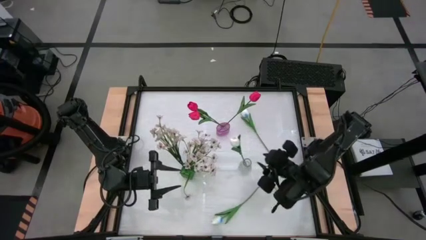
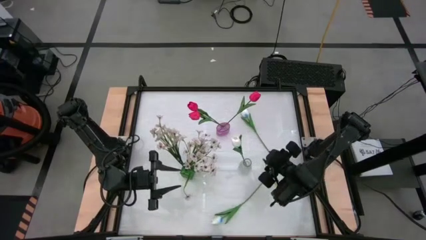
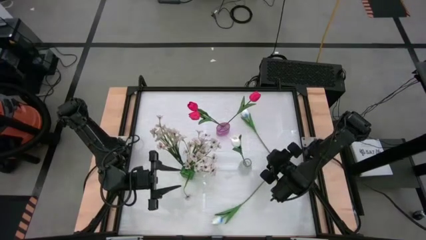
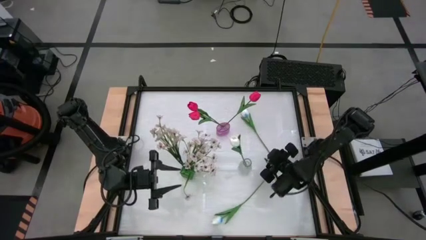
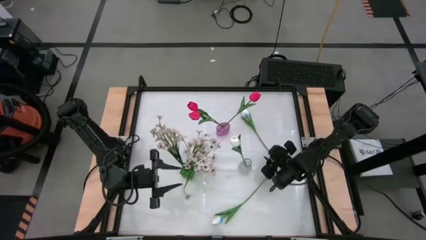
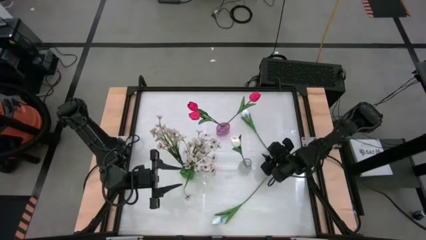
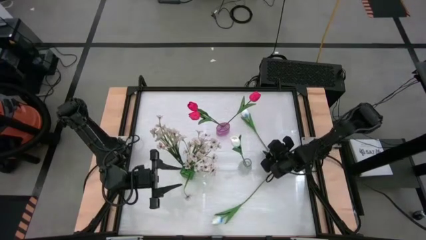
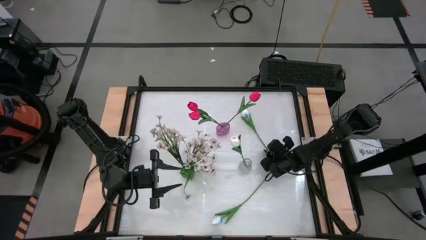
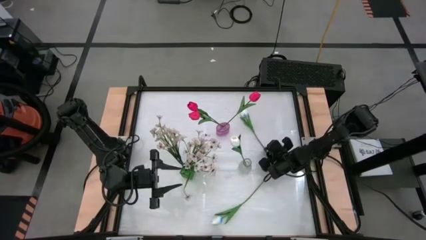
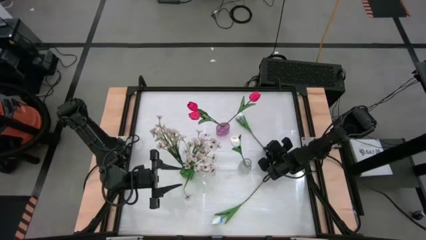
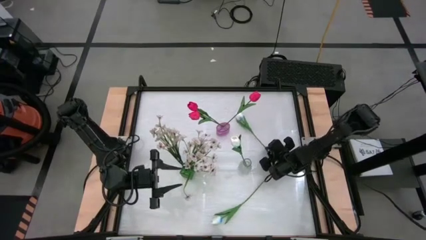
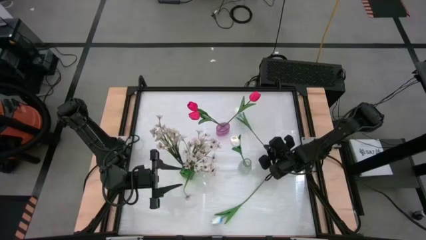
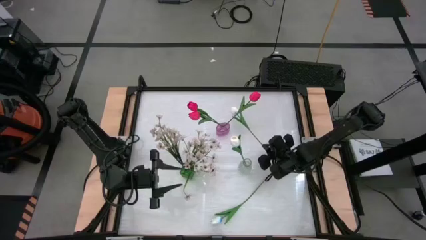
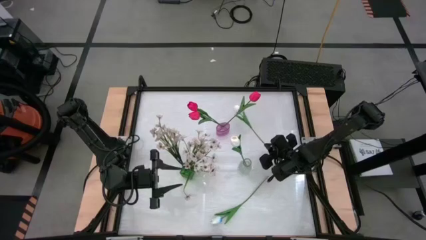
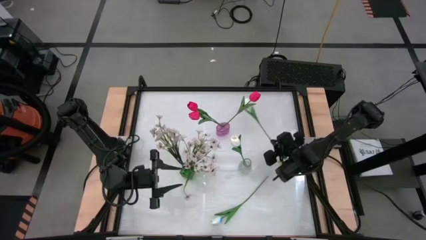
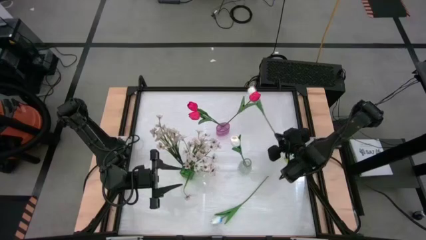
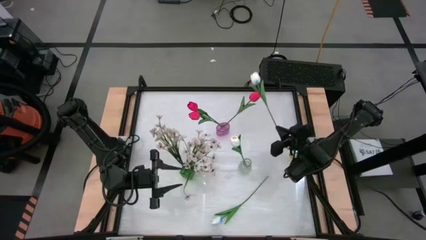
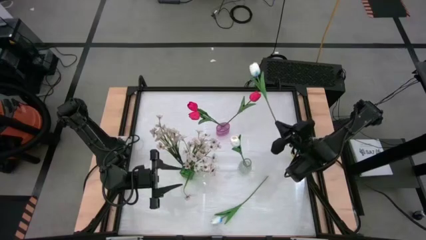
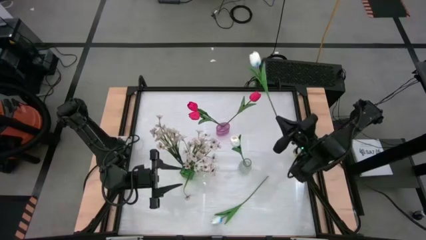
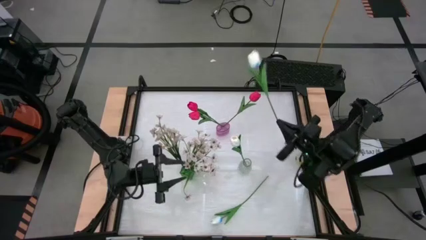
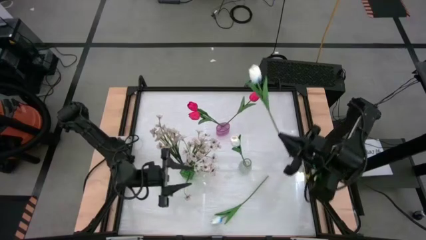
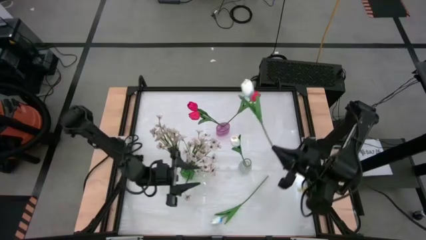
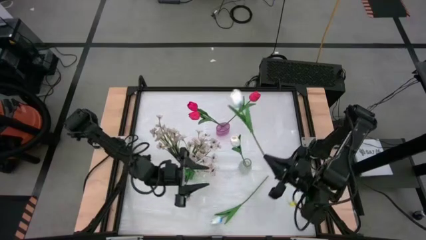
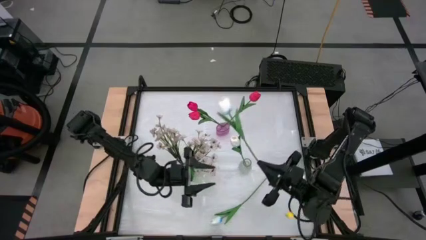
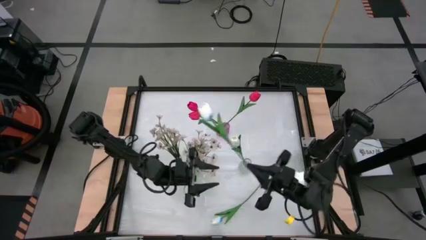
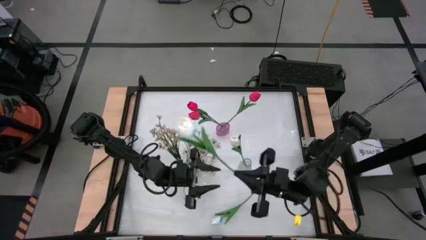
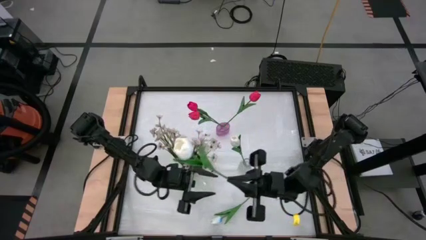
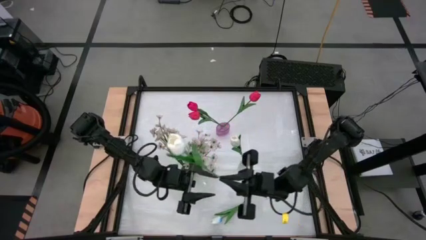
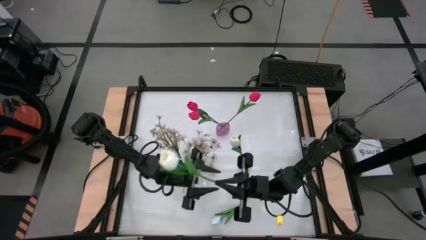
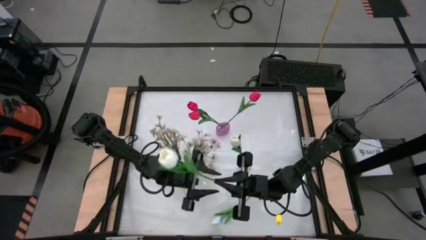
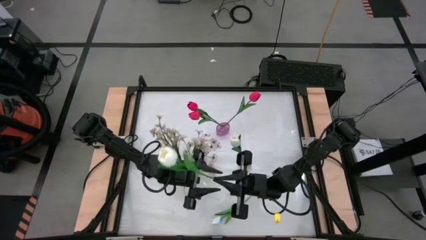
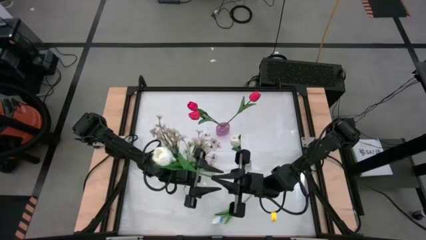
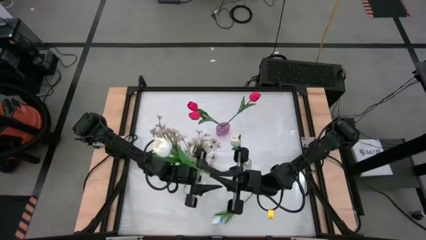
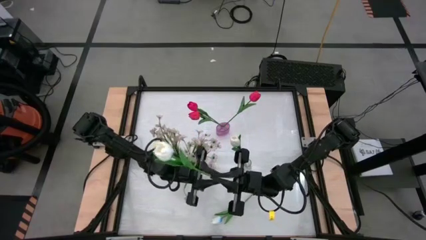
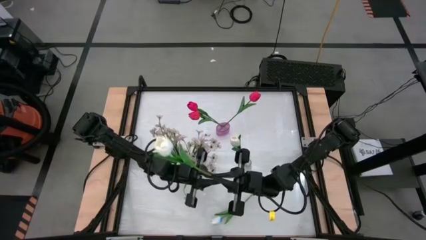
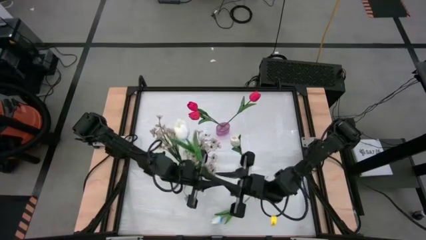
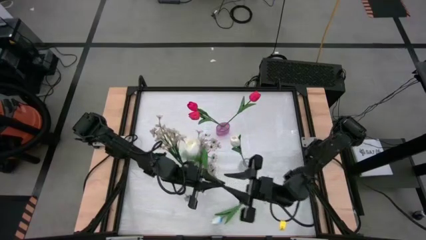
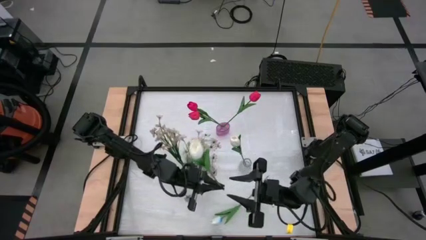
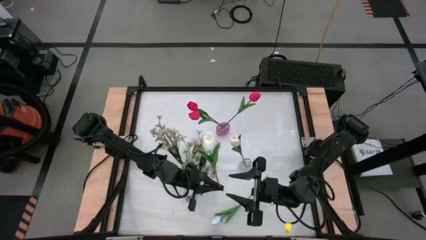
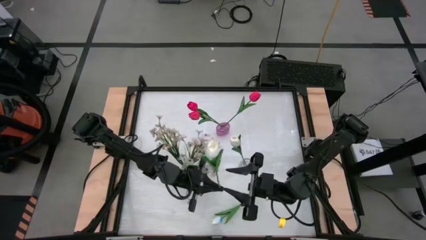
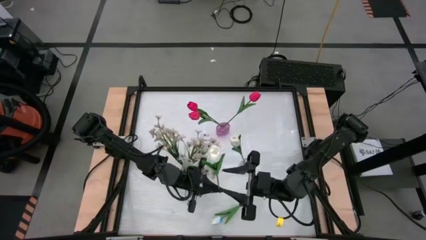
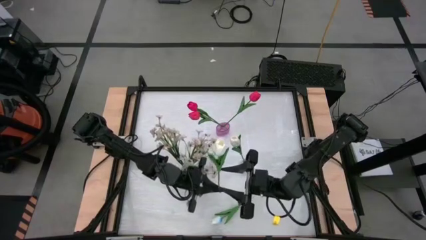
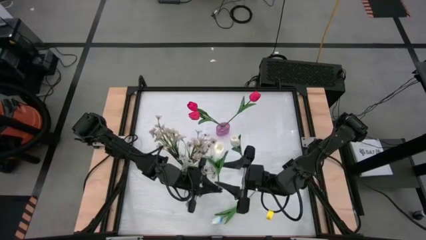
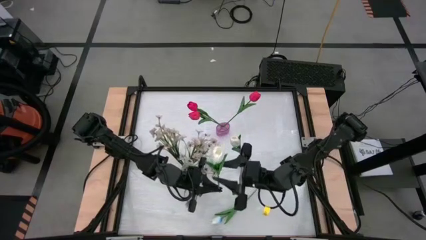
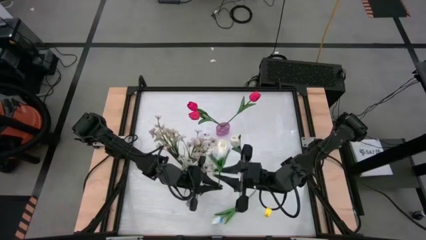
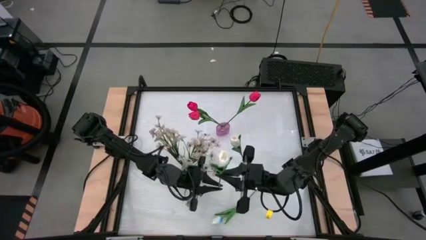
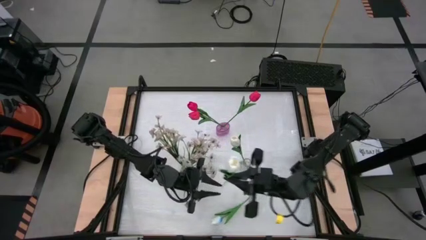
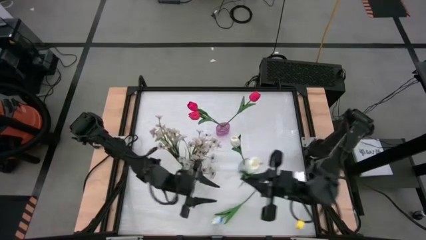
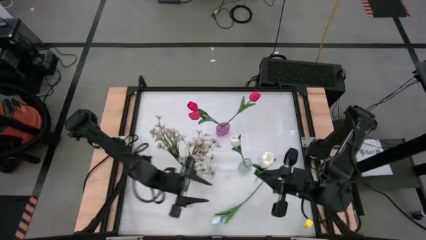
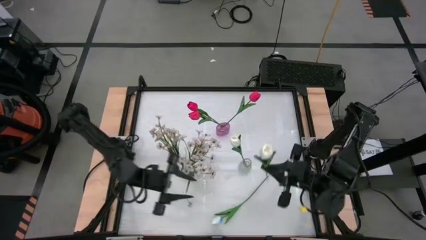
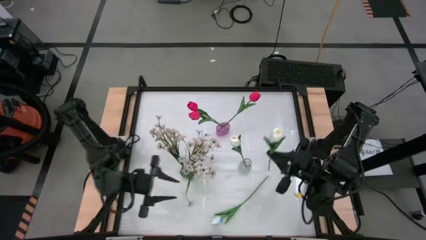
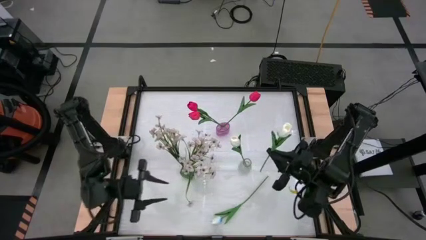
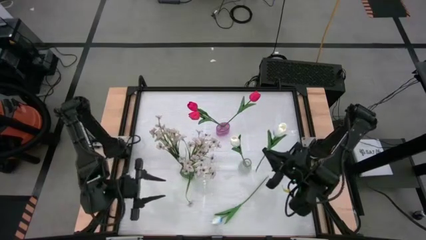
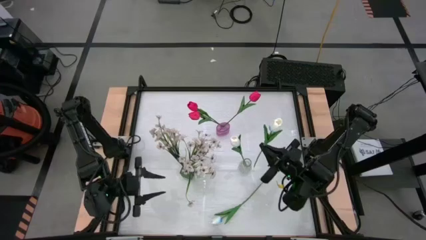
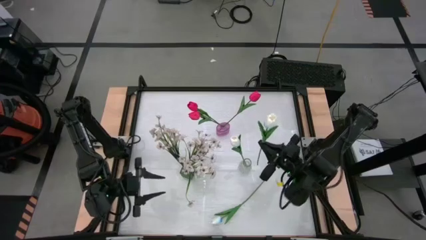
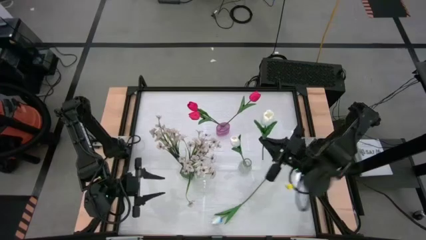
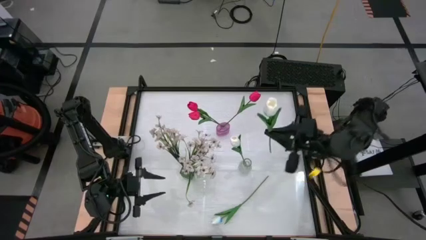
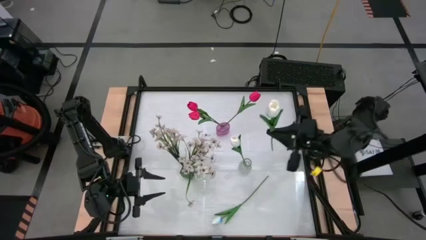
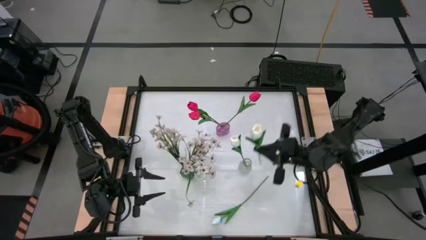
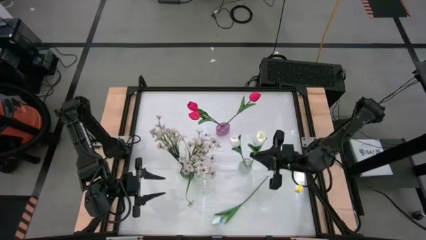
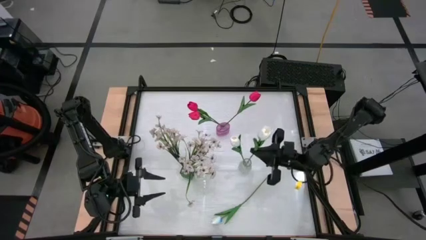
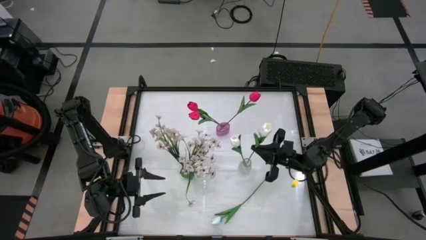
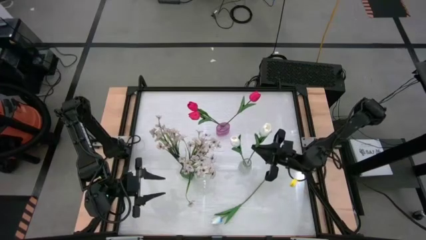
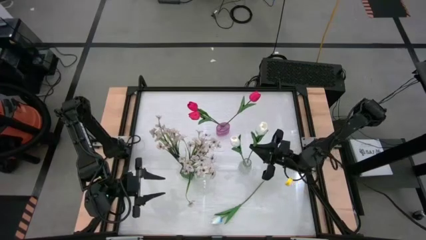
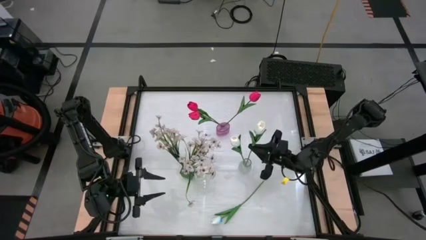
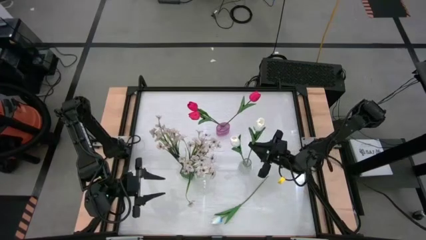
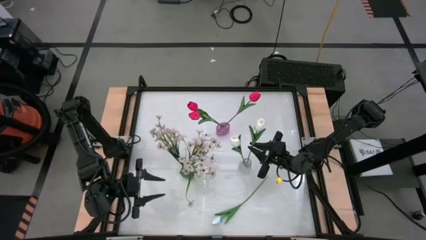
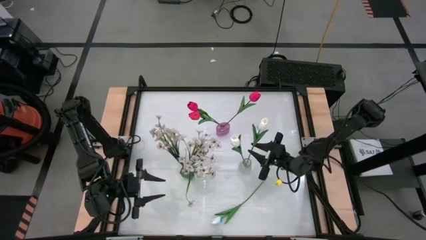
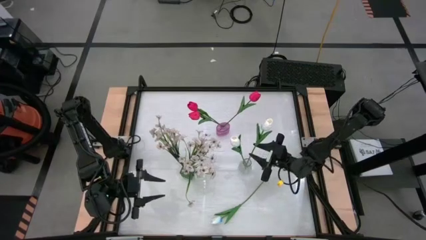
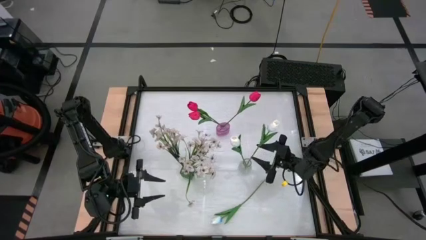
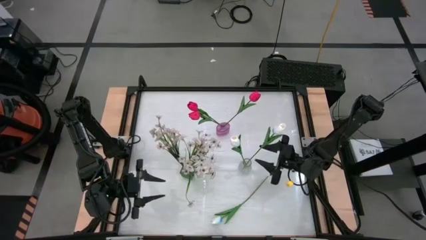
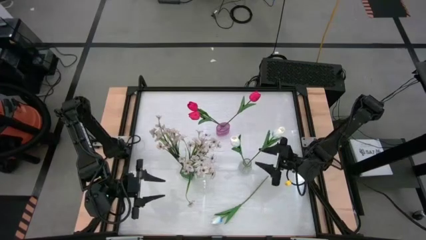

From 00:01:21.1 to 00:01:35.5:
Task: Sort flowers into vase by color
Put the top white flower into the transparent vase

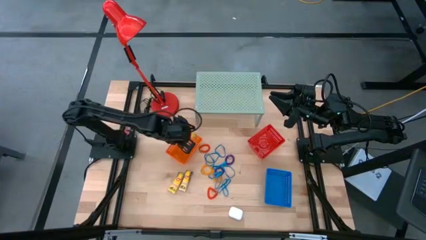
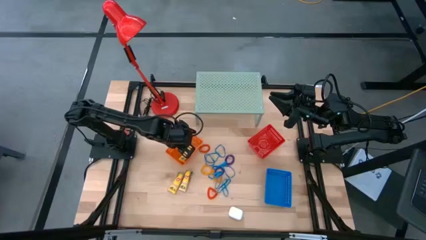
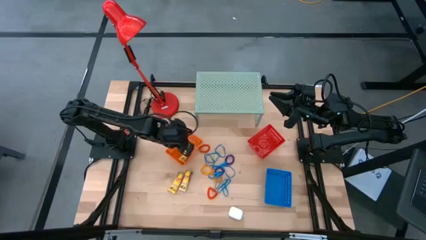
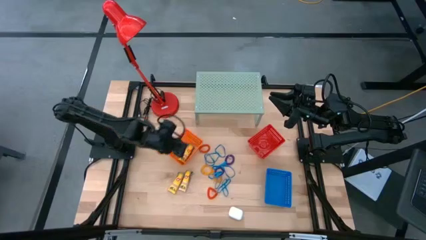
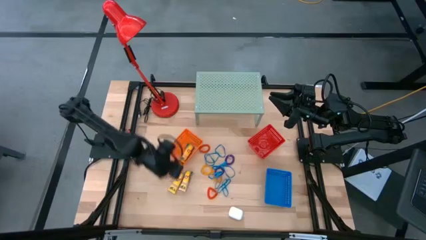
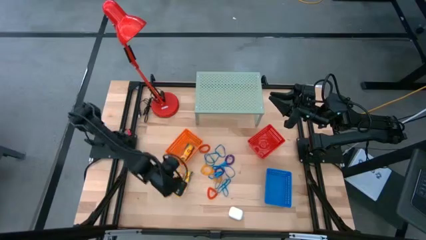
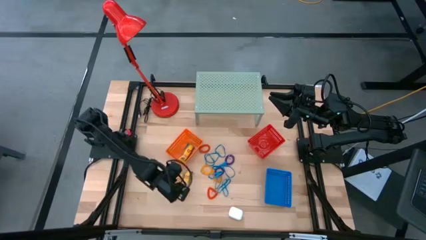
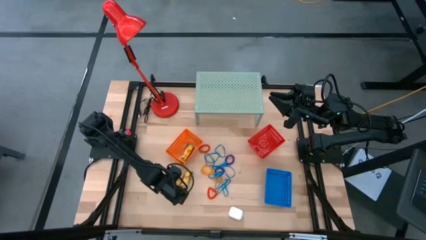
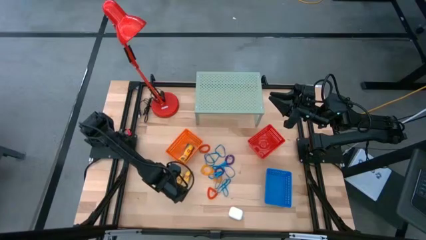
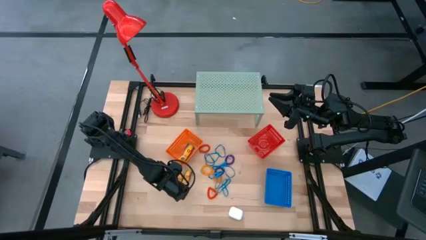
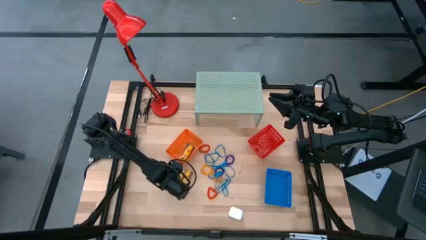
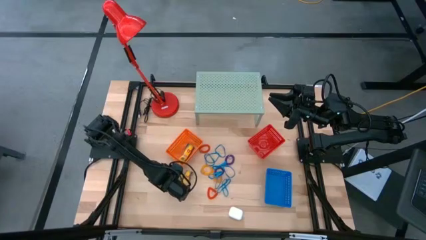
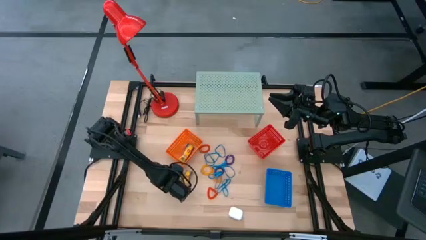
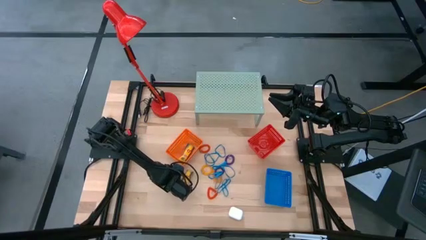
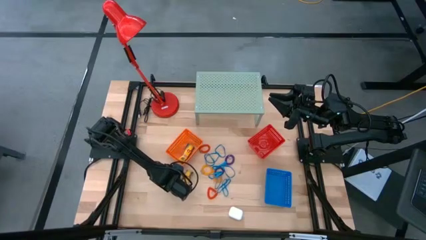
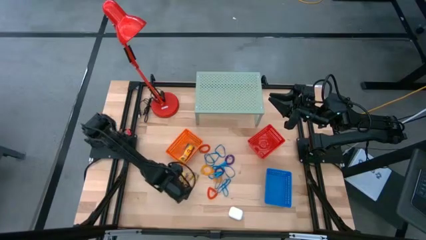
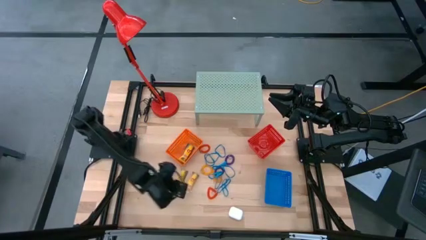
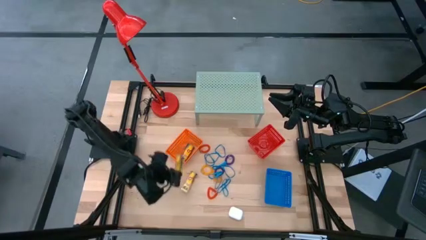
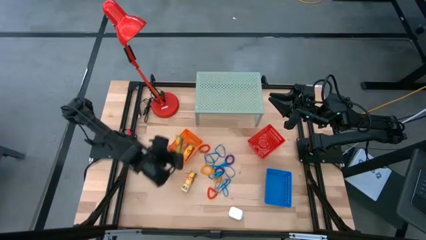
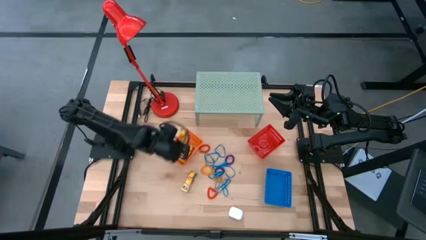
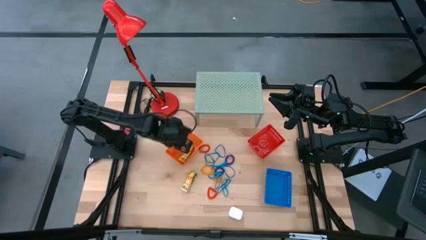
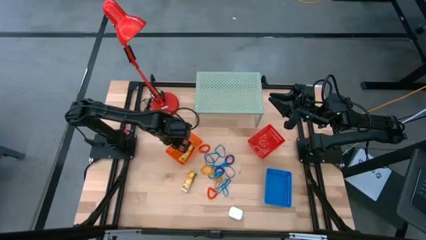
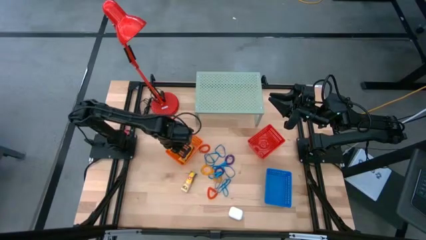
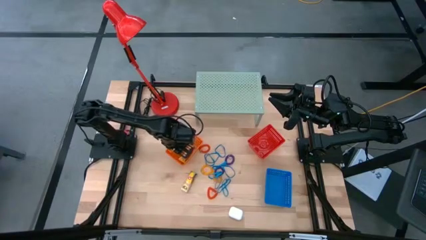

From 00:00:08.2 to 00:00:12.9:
Task: Pick & Place Office Desk Supplies
Put the crayon box into the orange bin
